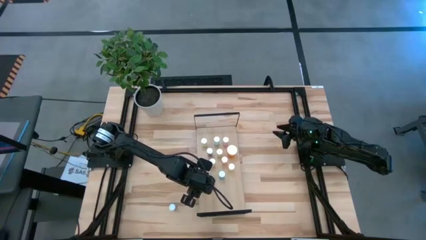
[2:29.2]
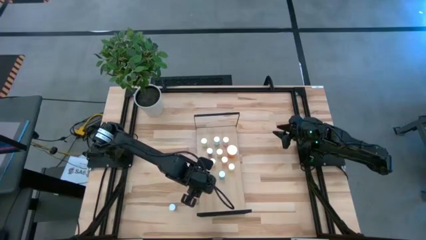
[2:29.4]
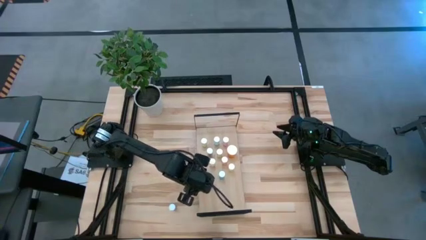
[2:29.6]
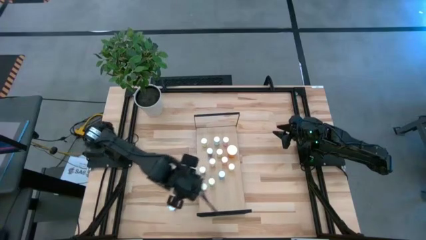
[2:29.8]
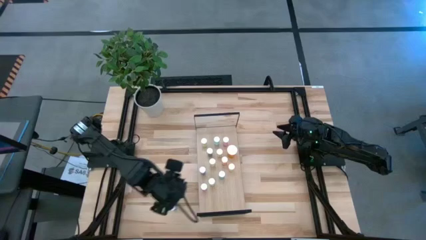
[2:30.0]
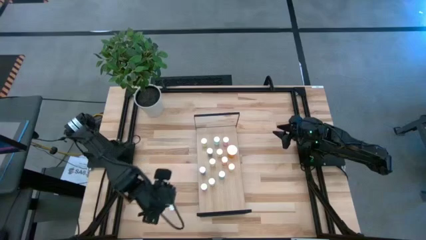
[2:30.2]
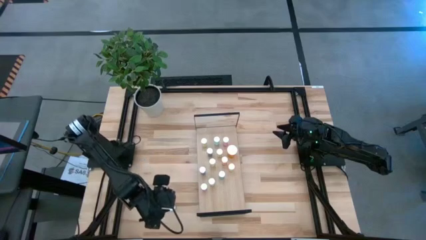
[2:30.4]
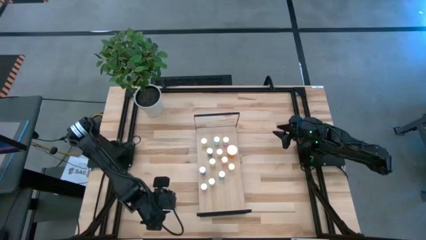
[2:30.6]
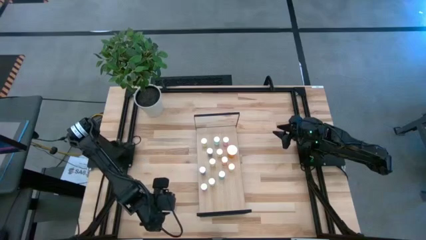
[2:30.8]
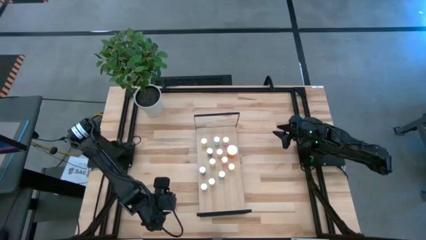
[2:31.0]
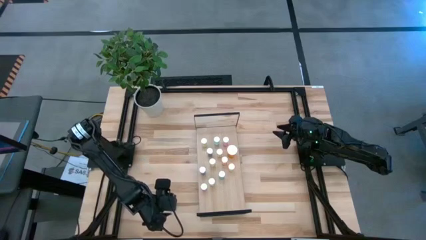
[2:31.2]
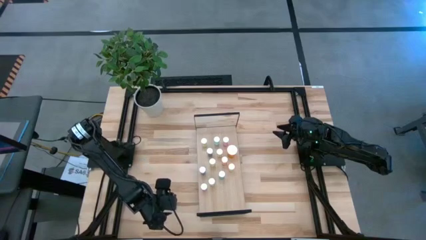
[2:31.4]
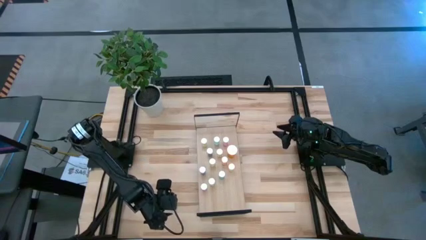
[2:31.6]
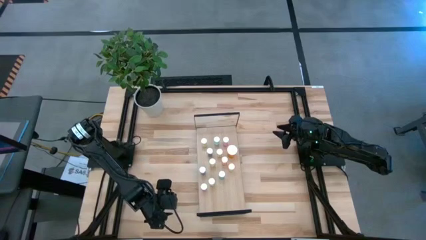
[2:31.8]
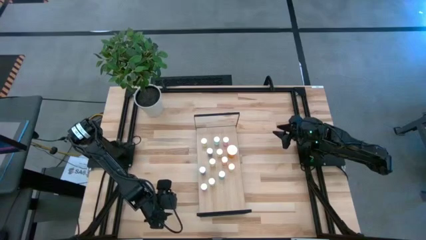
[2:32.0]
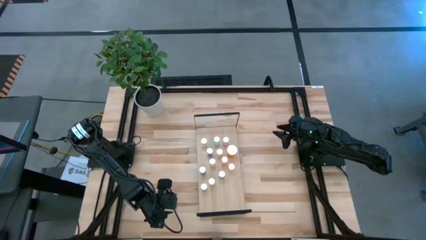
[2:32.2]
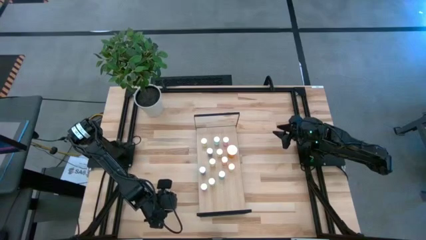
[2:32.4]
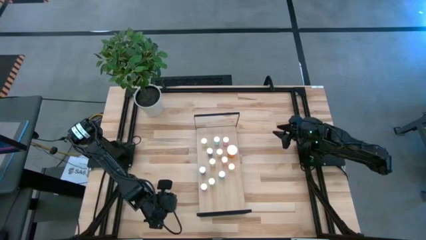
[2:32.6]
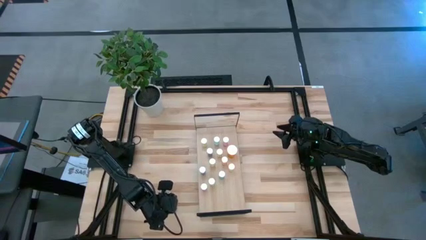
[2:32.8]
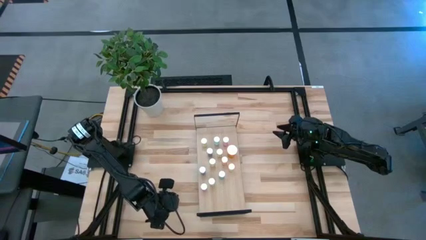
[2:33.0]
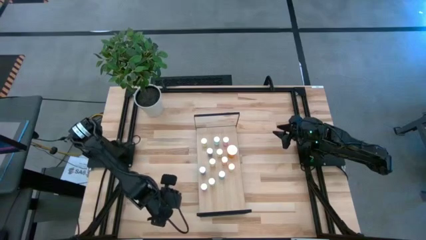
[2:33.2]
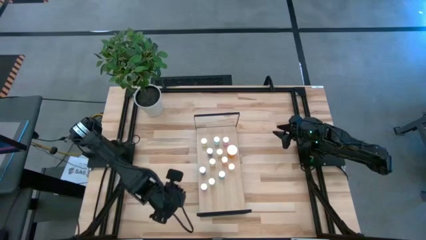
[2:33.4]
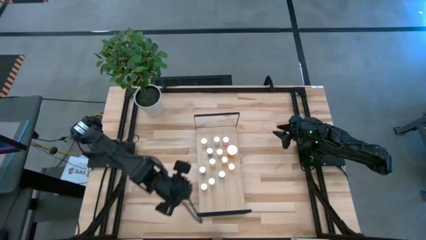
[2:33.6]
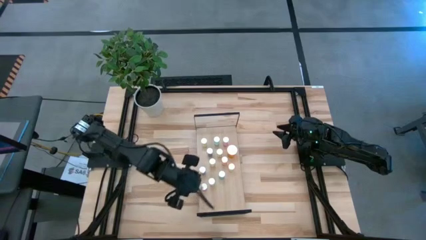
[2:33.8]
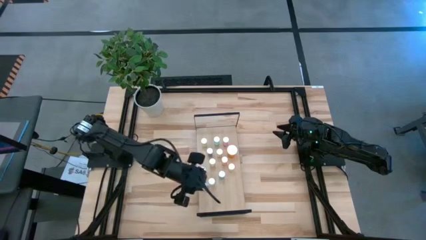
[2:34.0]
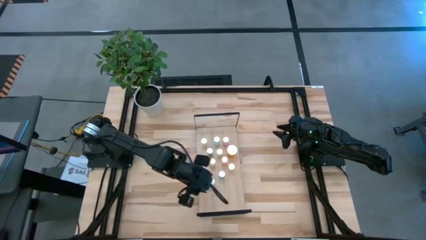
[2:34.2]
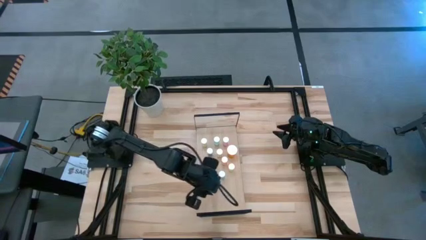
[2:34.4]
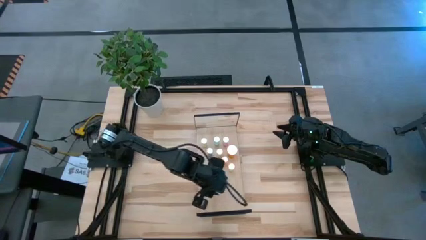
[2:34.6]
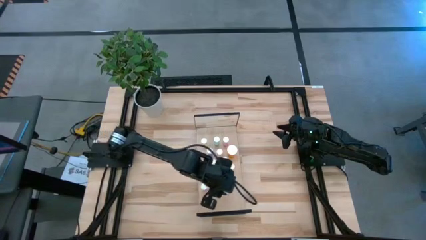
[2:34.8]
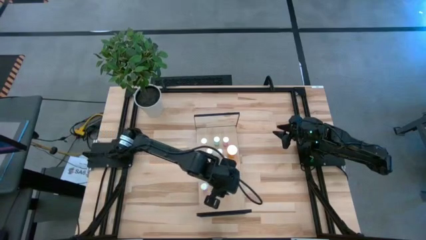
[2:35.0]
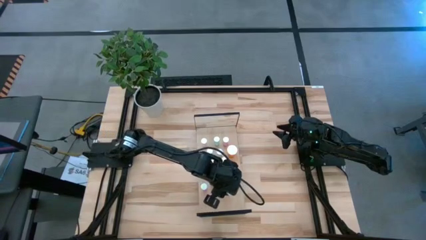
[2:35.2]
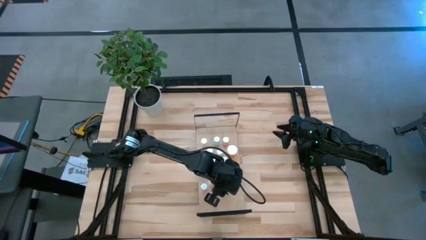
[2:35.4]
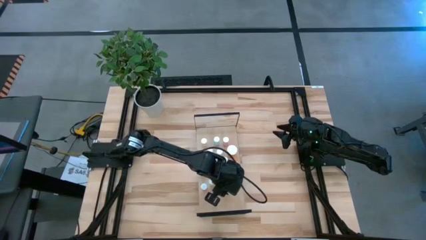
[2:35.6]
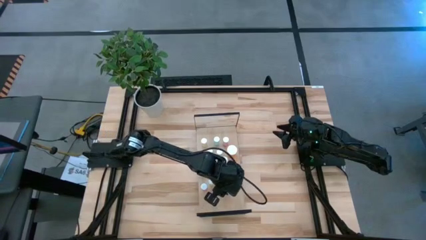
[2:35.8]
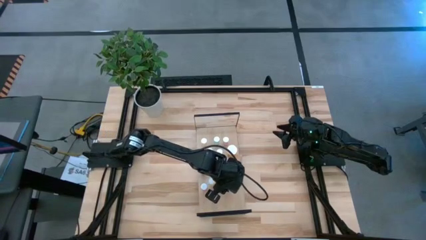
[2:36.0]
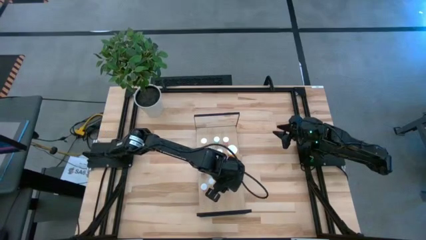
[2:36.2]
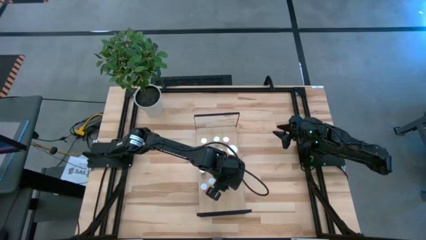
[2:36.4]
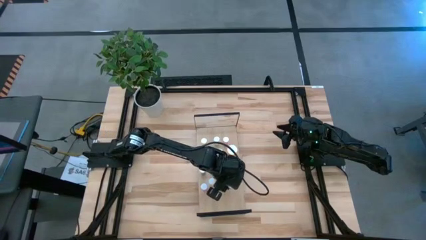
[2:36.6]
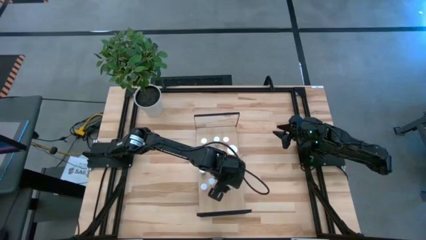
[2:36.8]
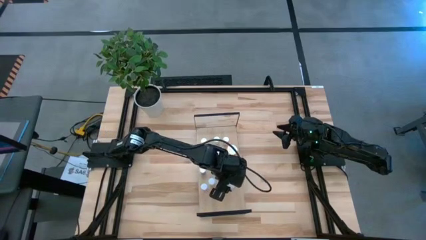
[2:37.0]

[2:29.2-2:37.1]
Task: Pick and place medicine bottles onto shelf by color
Put the blue pill bottle on the shelf

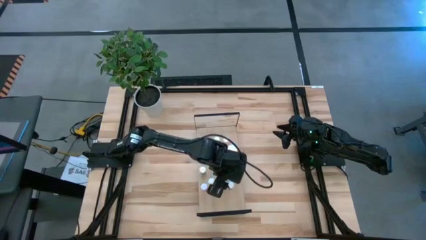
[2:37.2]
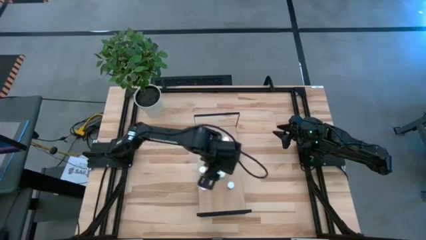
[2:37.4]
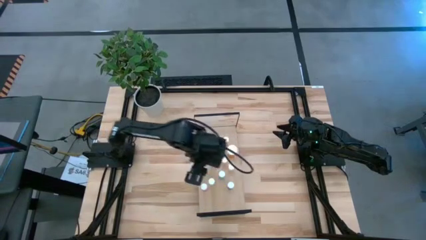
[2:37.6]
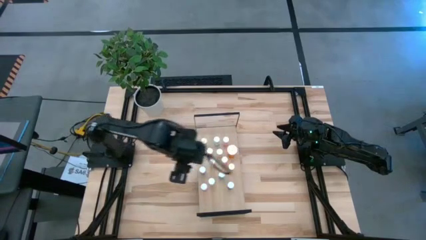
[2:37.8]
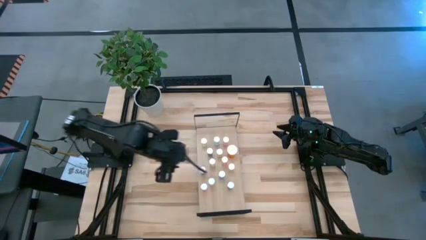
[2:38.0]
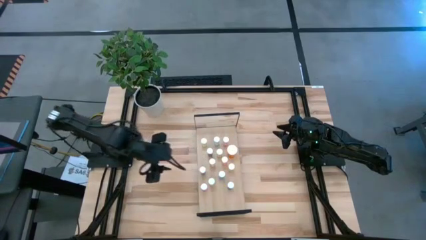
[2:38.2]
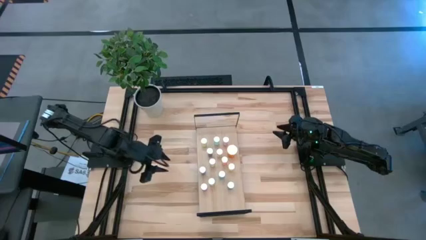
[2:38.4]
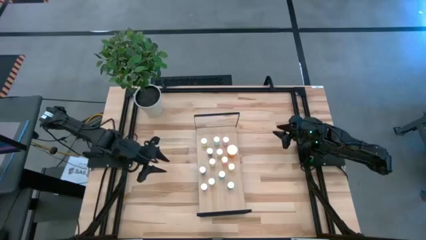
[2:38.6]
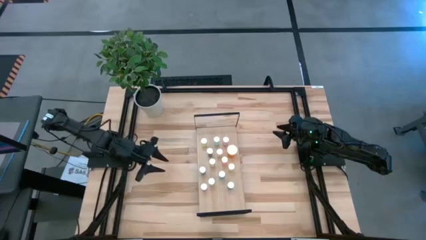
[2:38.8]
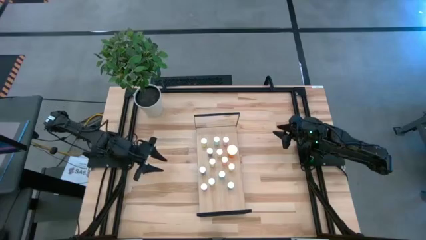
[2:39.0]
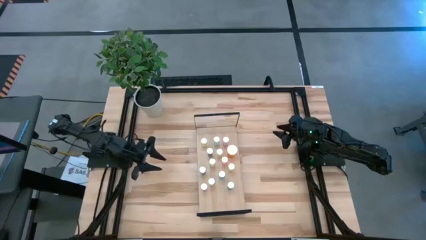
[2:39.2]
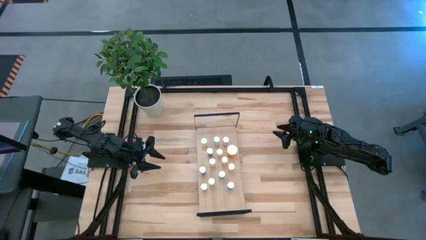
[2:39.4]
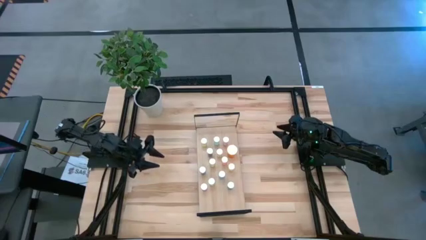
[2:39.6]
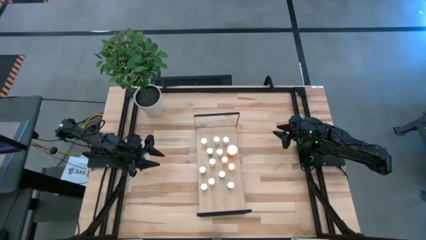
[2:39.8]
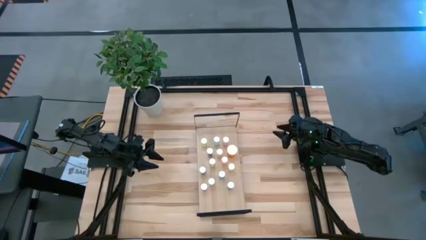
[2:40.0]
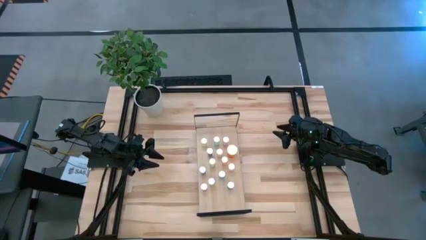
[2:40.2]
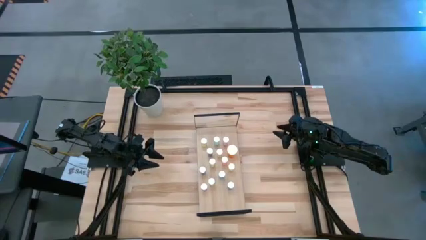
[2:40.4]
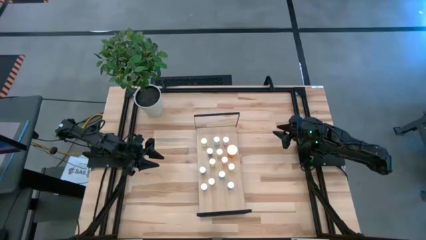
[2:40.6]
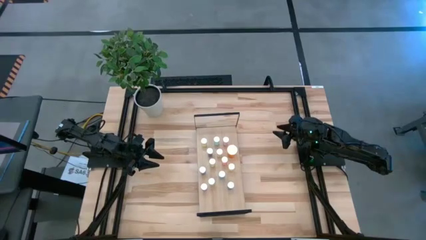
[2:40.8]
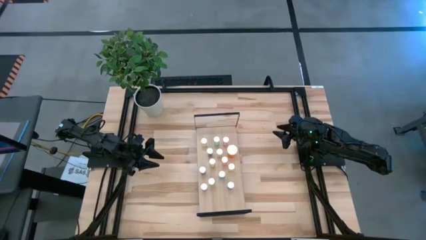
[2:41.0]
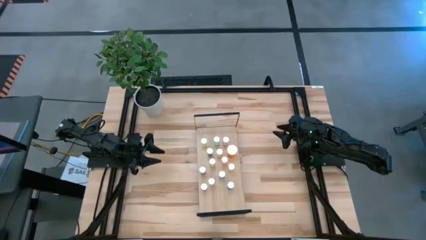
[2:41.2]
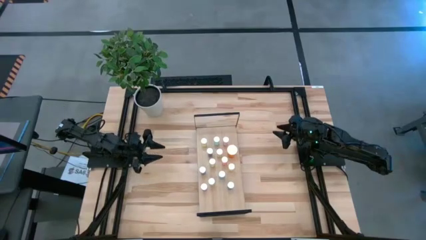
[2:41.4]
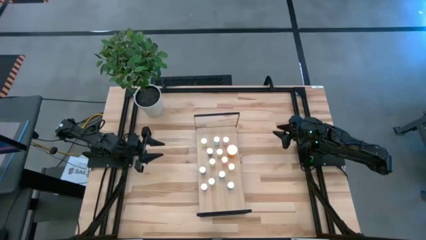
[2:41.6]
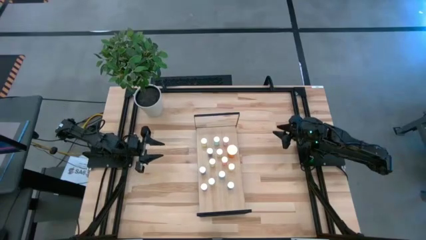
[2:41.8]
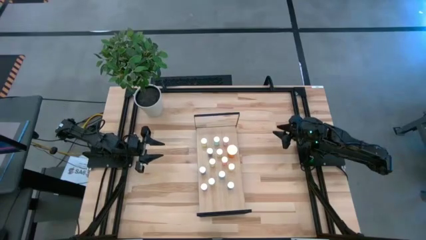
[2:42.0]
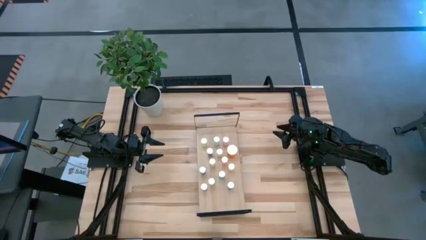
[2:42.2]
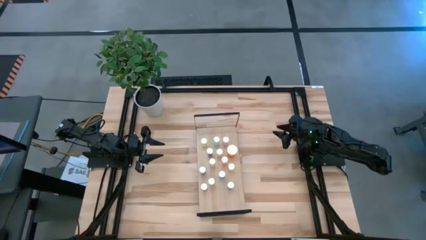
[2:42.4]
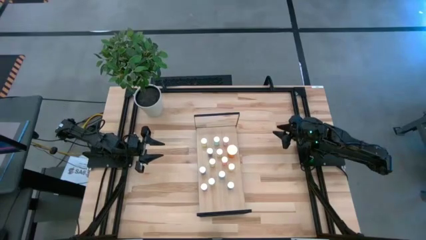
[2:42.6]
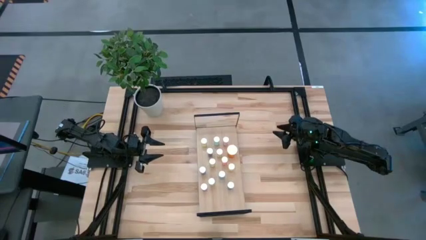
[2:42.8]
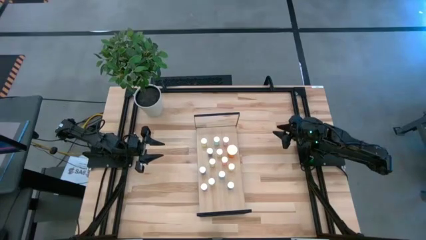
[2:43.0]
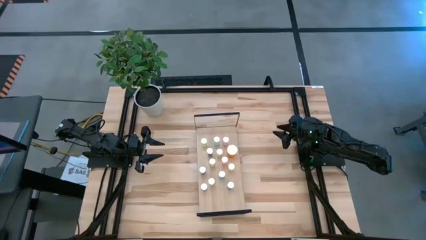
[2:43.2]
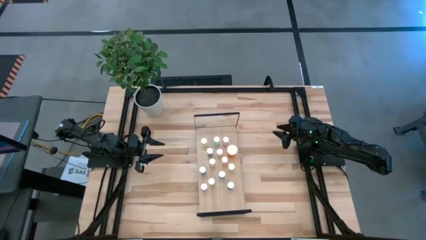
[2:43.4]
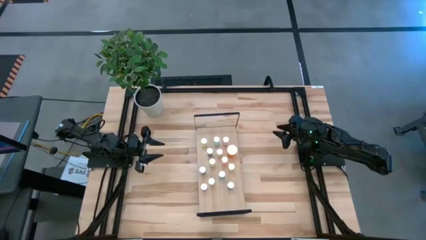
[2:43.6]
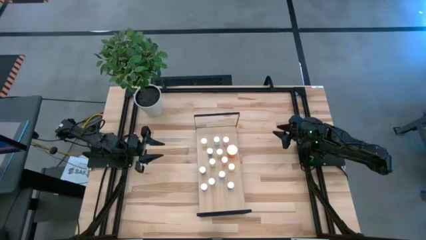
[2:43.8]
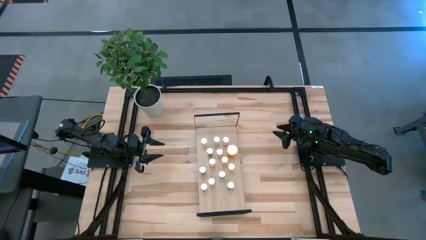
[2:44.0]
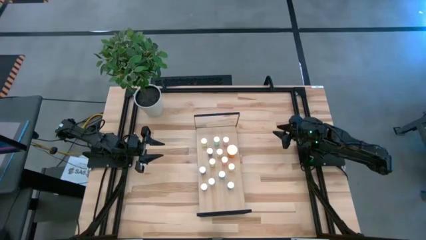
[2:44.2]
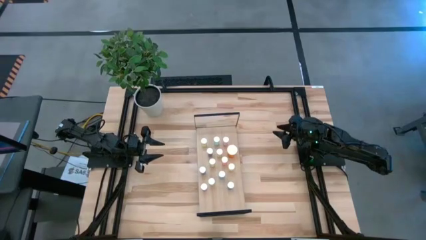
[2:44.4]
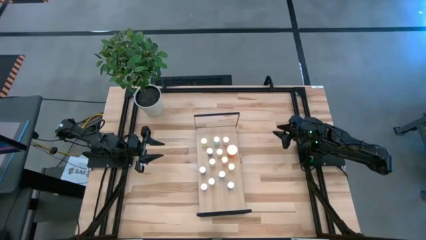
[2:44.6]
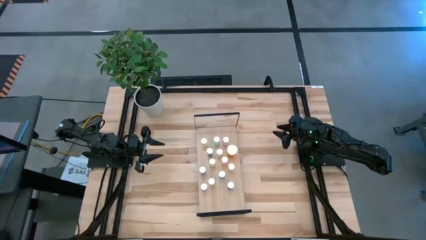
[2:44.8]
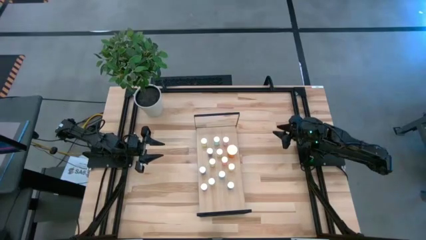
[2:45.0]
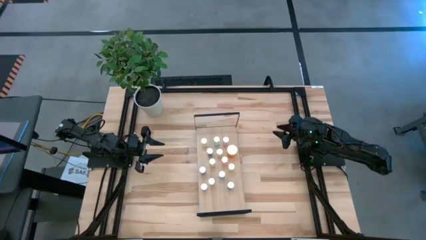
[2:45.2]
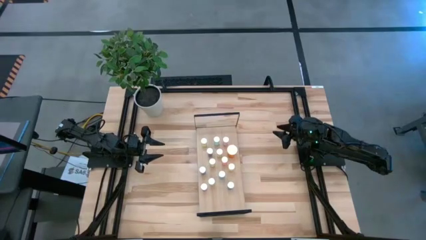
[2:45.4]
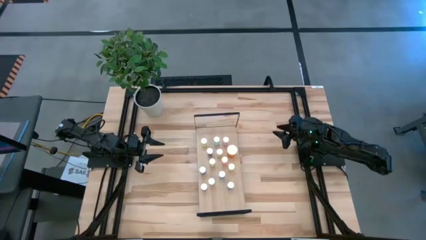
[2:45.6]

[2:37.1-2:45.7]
Return to Home Position

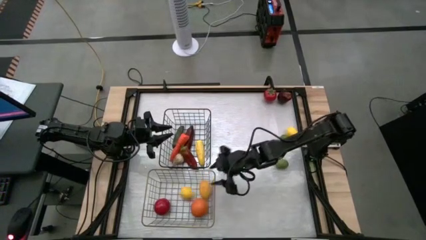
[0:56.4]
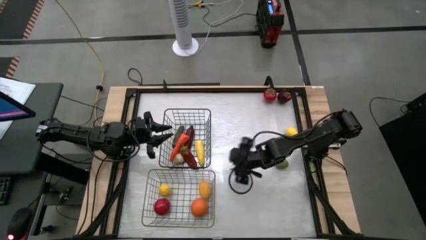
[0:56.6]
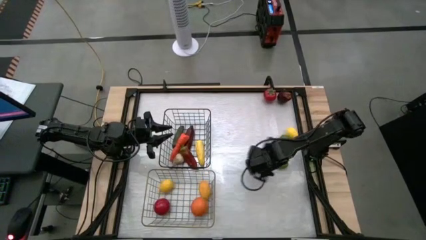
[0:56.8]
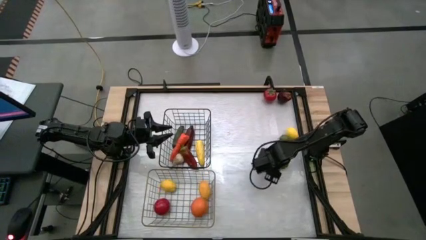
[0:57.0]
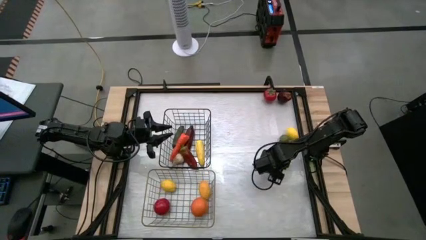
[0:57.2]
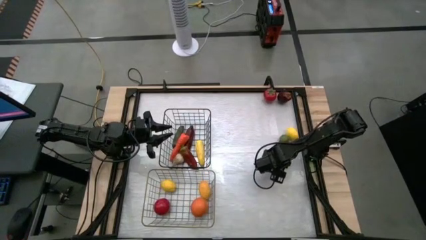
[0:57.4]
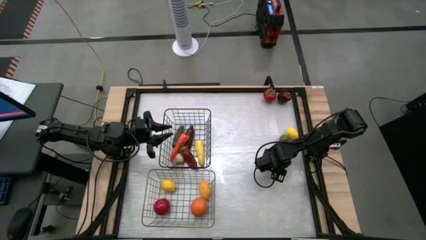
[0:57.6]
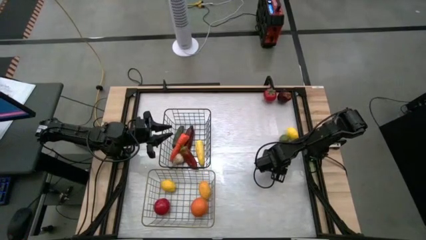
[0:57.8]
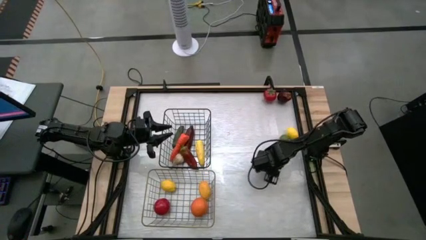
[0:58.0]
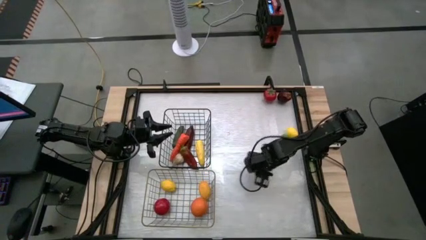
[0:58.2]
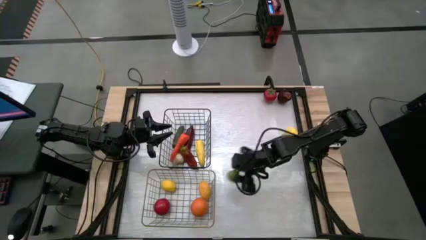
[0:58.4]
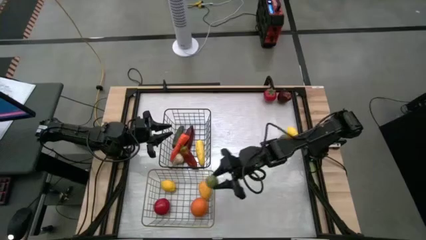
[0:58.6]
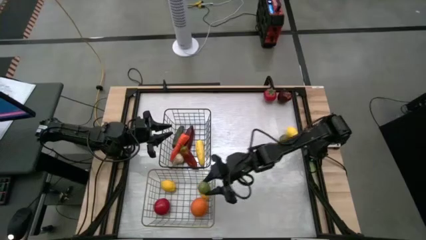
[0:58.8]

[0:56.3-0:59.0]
Task: Sort produce into baskets
Put the bottom lime into the silver wire basket
